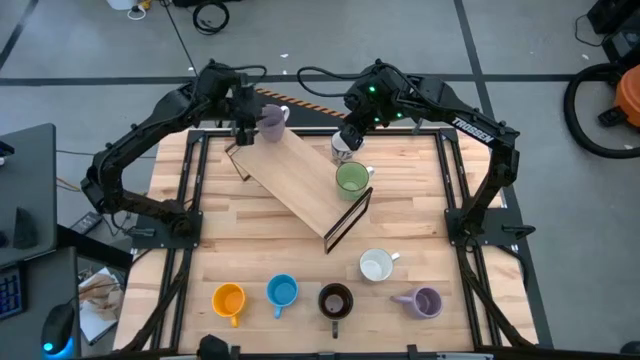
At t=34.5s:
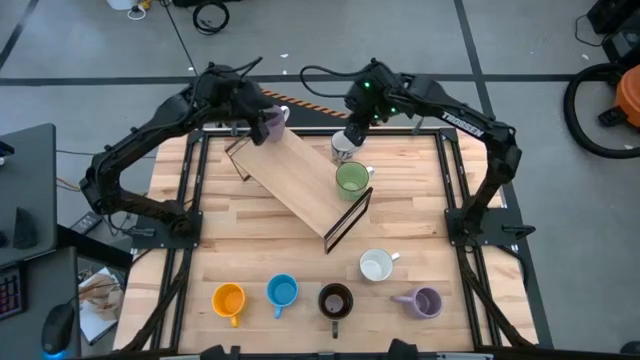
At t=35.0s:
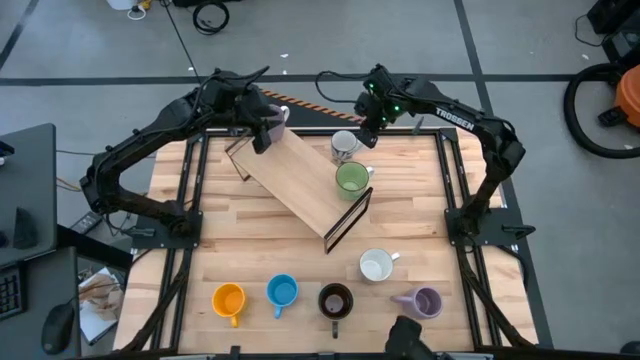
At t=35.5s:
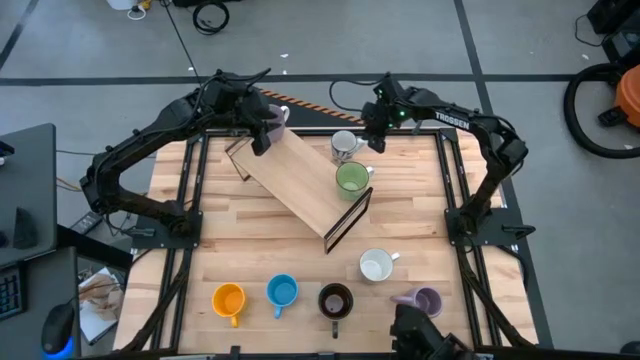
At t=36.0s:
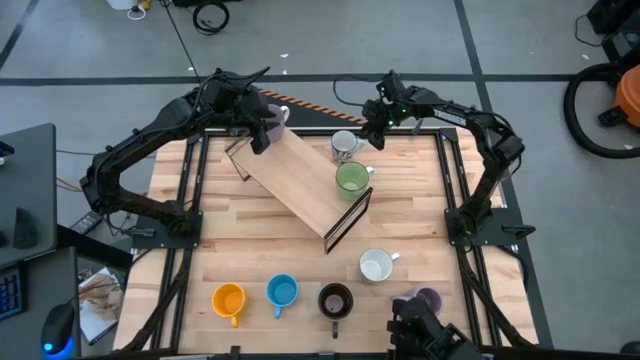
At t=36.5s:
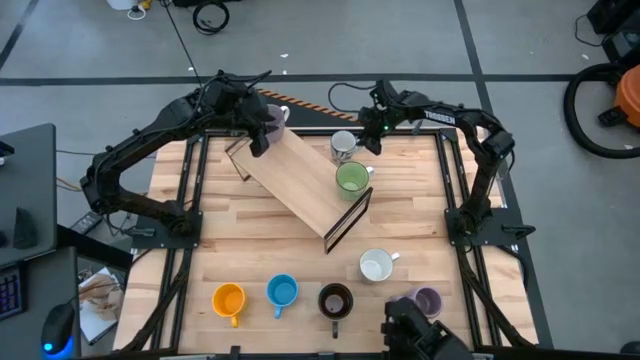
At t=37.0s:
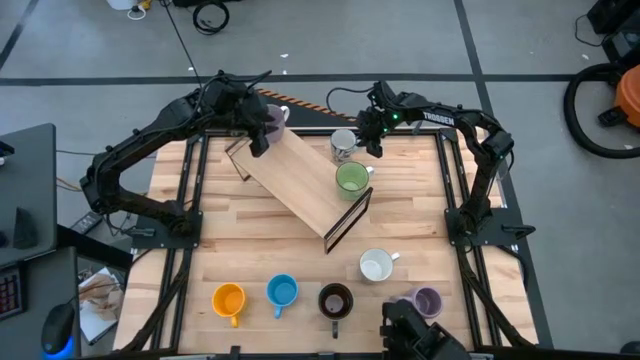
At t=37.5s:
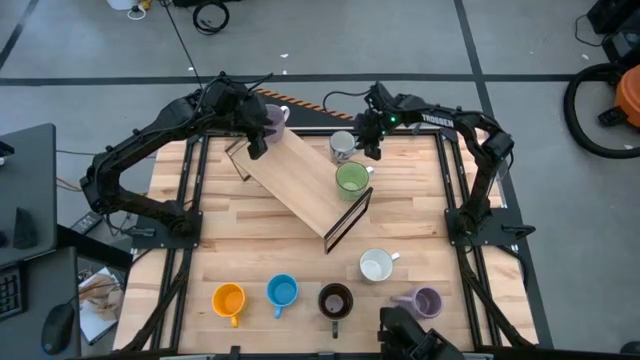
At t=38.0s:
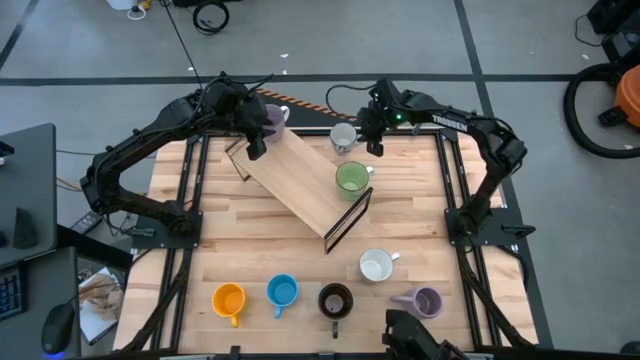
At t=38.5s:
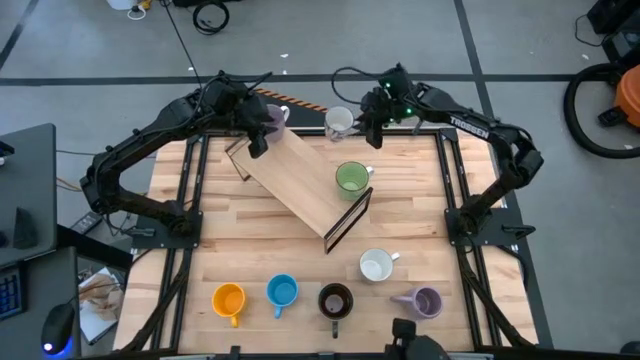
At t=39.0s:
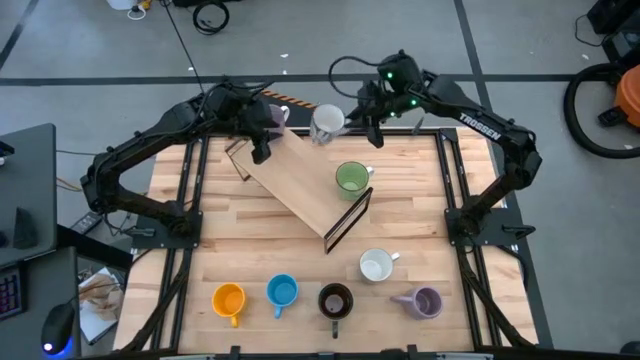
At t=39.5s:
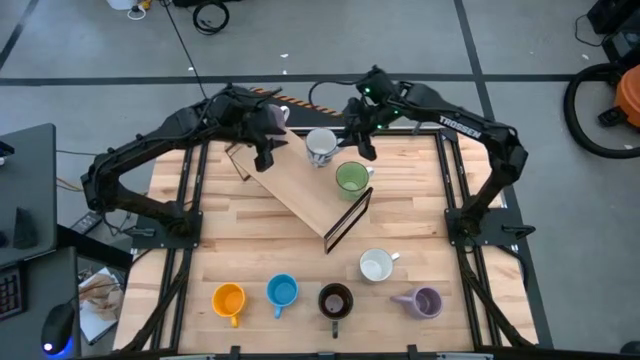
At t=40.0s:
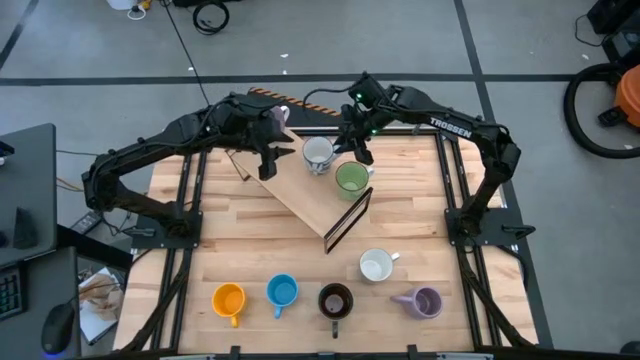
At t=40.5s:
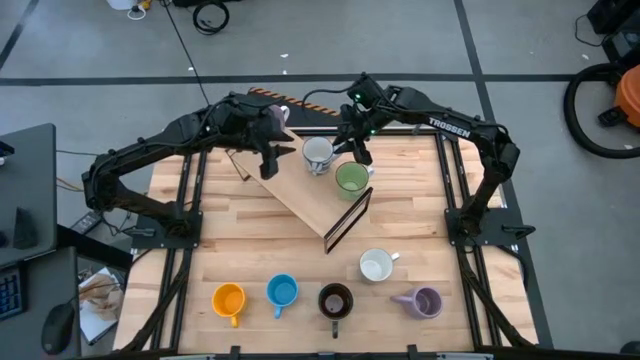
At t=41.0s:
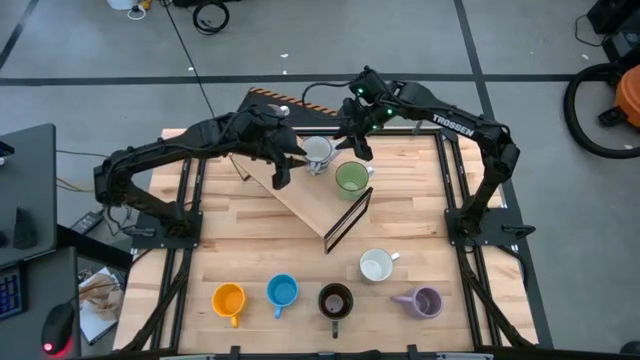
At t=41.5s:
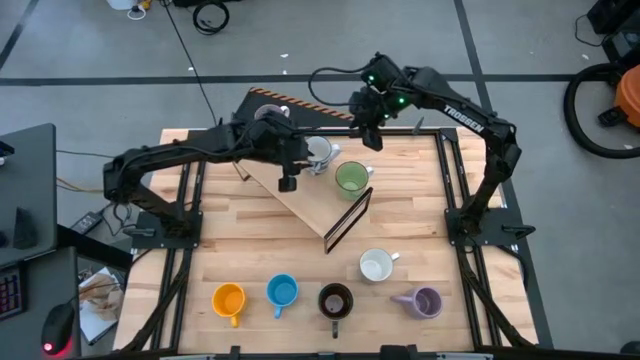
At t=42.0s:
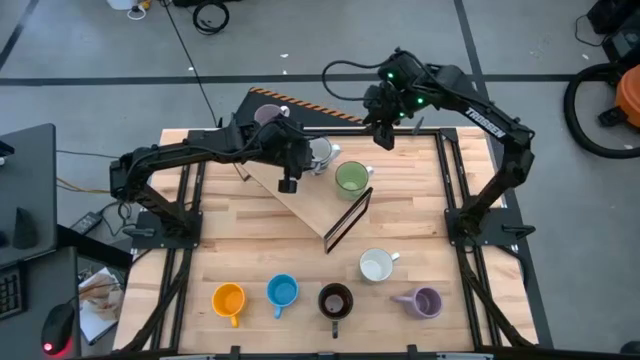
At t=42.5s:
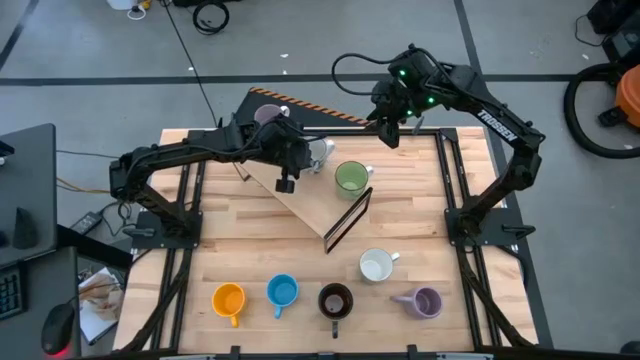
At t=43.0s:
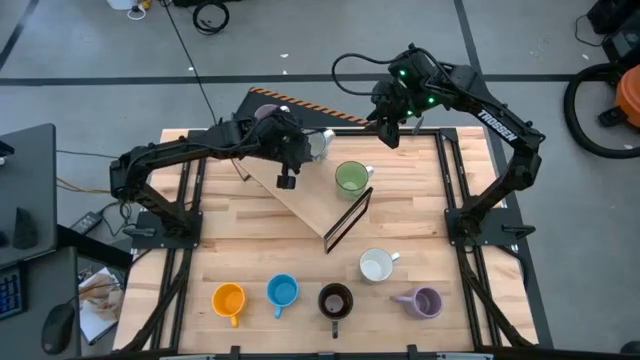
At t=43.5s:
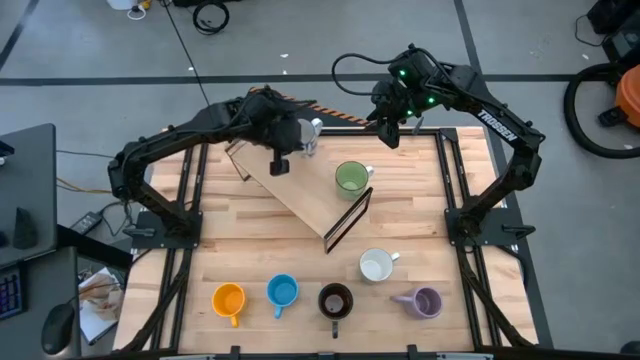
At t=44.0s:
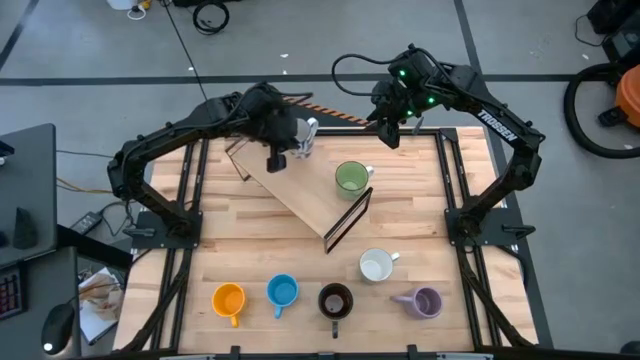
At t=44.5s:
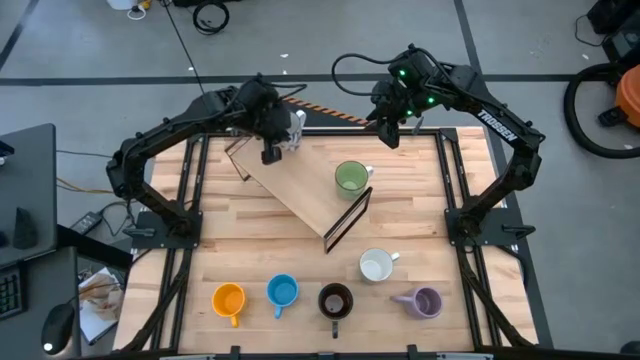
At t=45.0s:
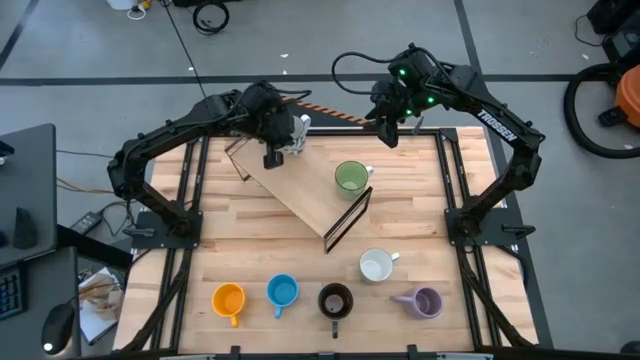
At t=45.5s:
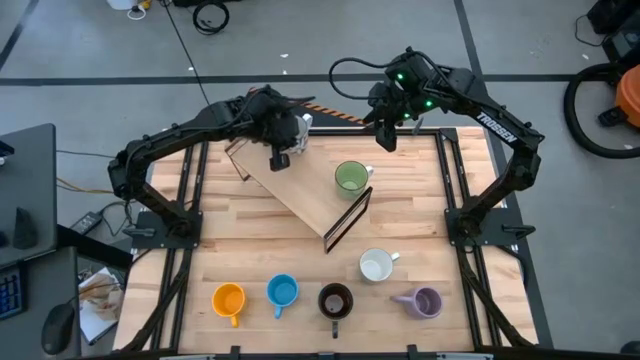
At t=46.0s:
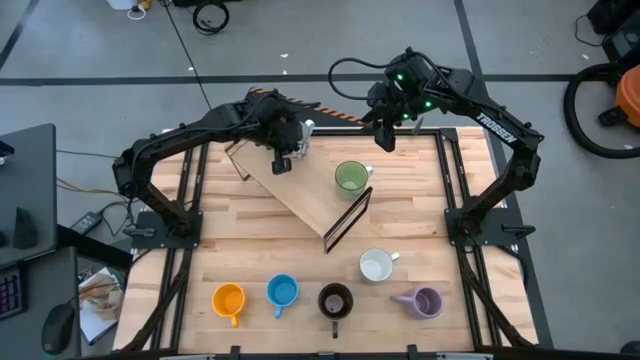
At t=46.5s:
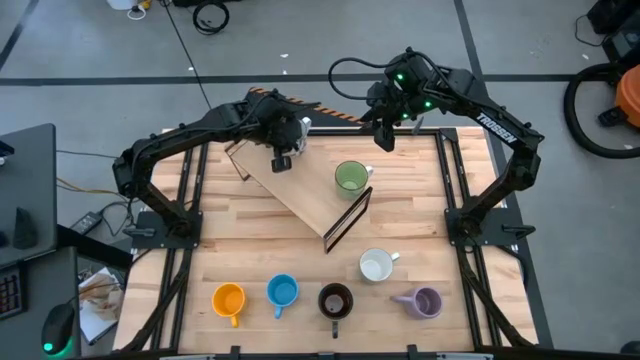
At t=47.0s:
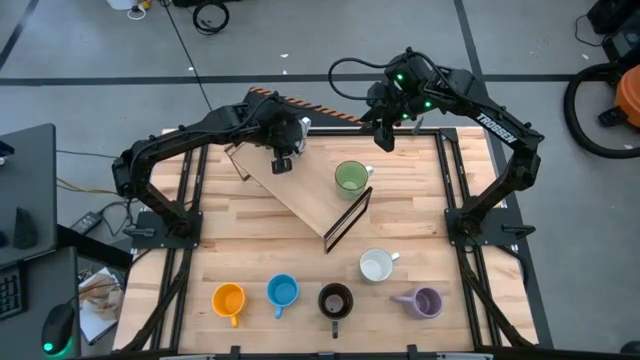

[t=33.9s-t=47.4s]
Task: Place coffee mugs
Put the white mug on the shelf

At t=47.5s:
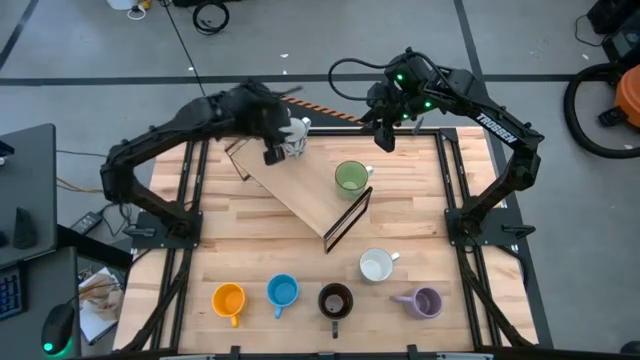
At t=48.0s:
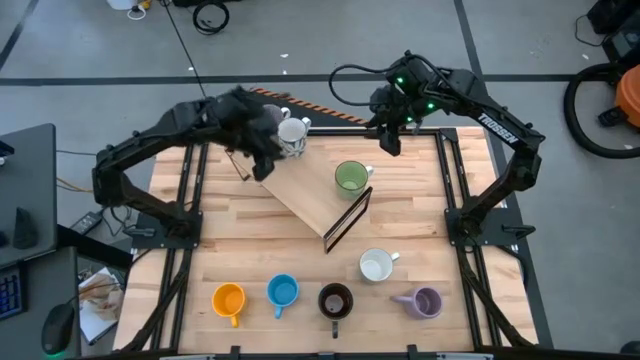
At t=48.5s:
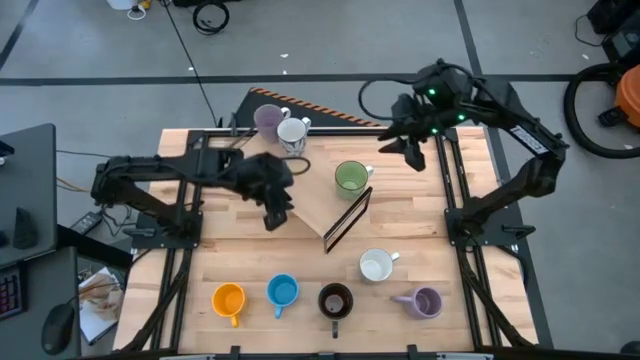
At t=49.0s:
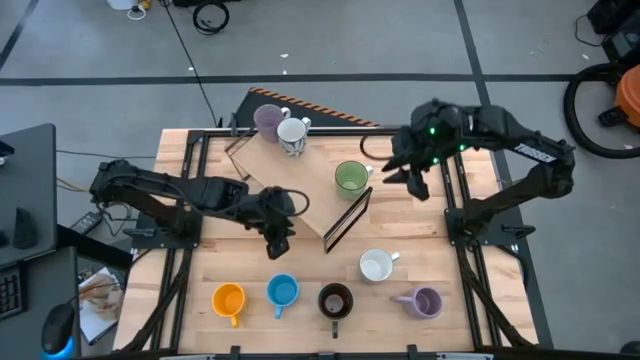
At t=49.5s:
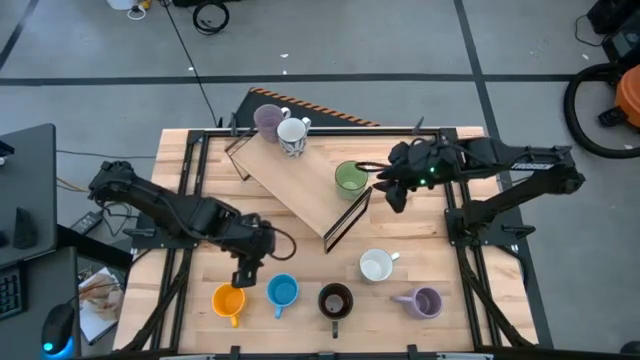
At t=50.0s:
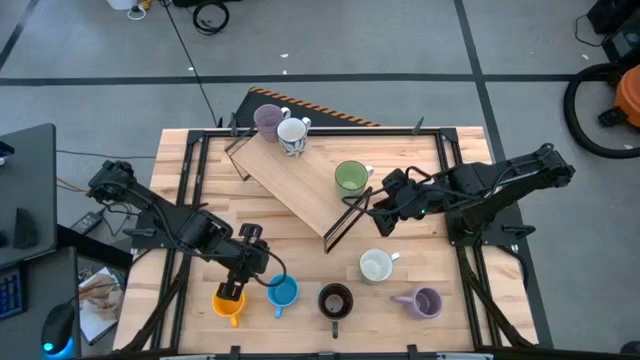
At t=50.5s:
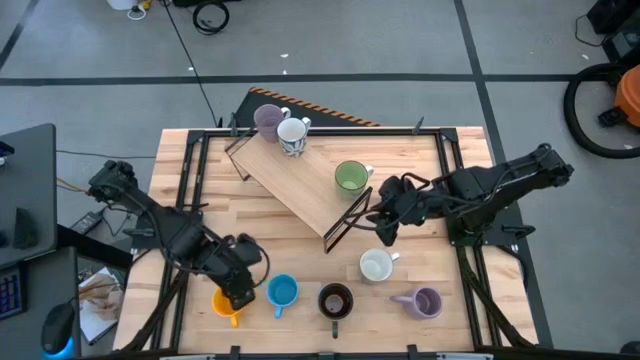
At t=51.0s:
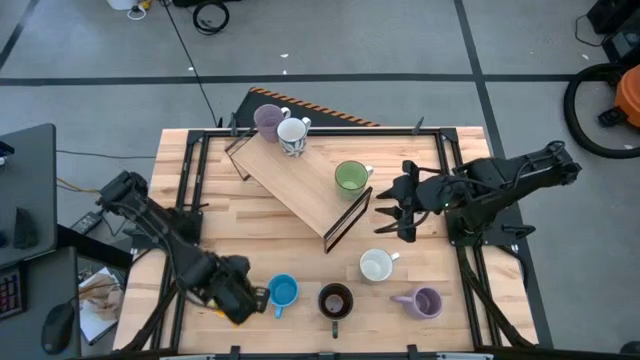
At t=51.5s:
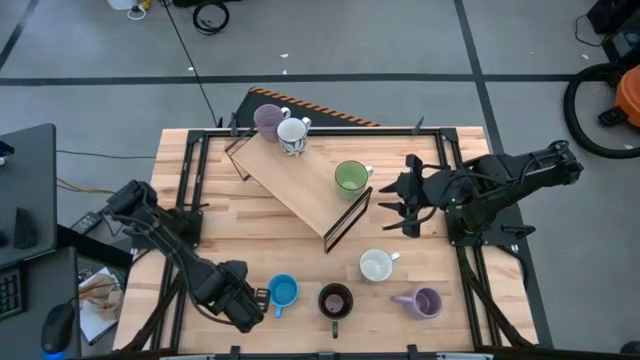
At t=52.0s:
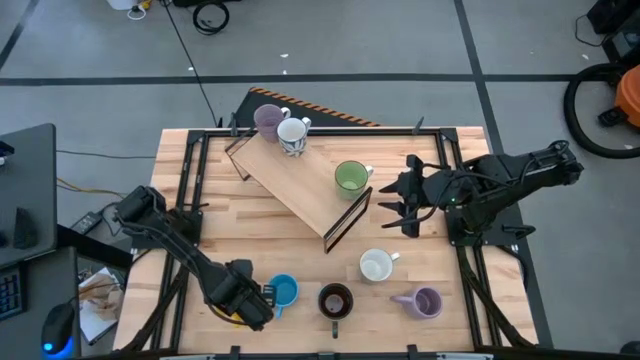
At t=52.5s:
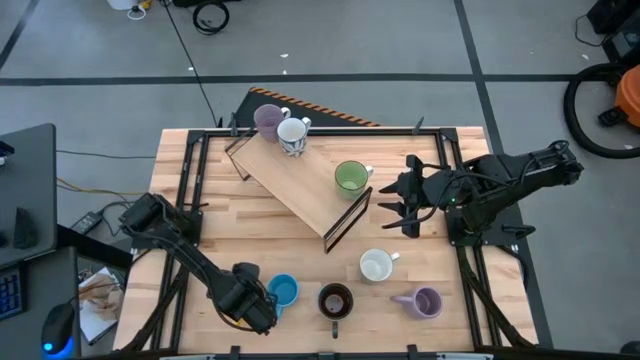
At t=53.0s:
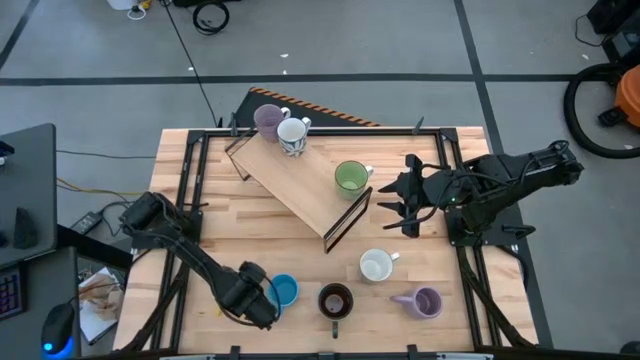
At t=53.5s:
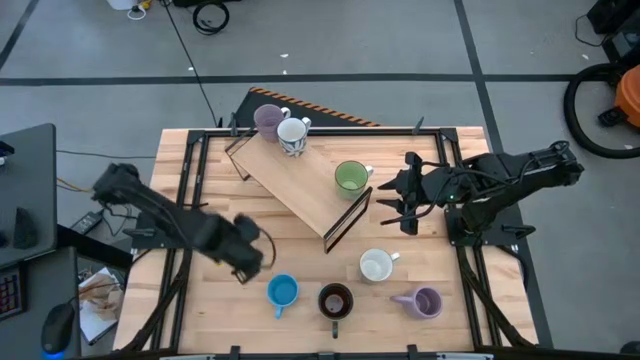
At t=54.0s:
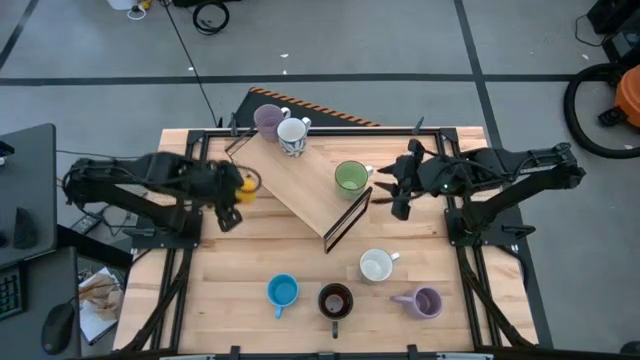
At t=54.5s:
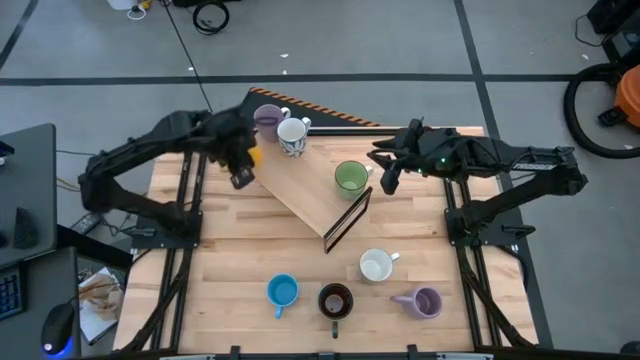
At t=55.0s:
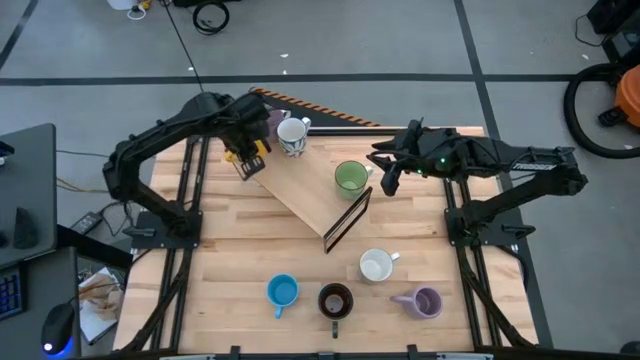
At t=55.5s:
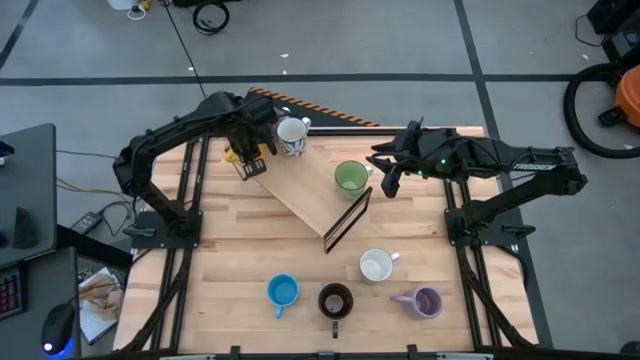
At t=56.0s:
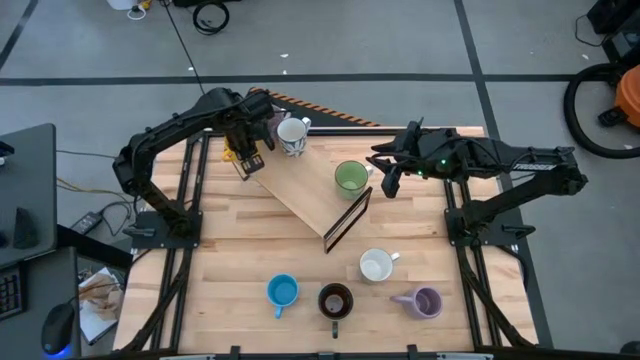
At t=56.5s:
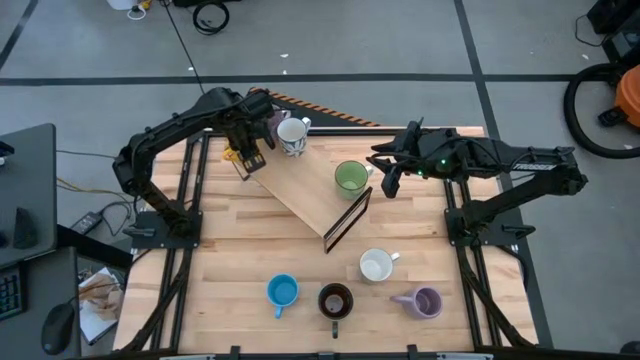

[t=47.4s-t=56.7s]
Put the yellow mug on the shelf
